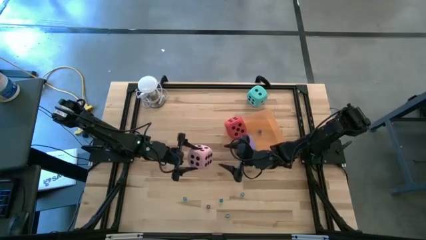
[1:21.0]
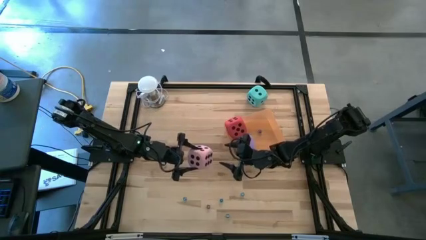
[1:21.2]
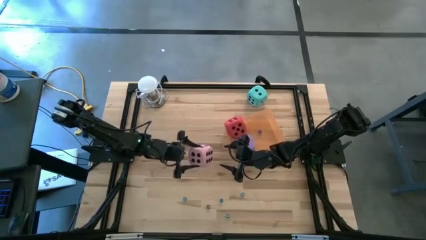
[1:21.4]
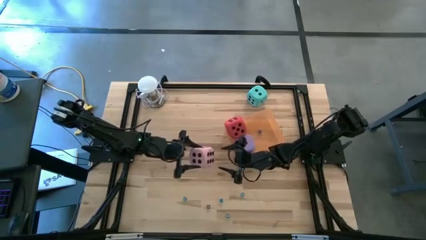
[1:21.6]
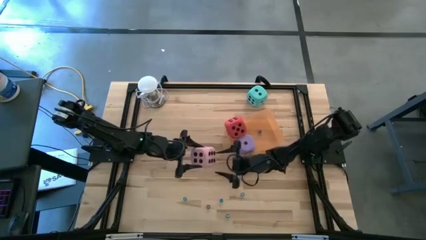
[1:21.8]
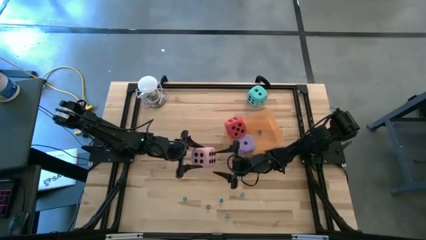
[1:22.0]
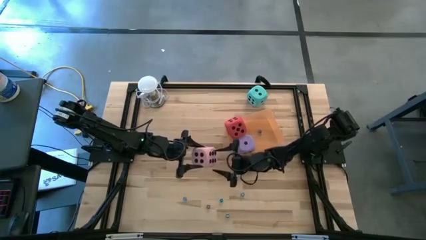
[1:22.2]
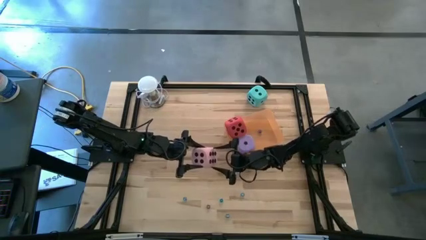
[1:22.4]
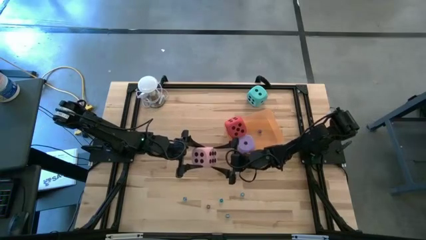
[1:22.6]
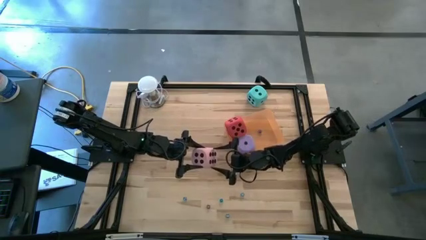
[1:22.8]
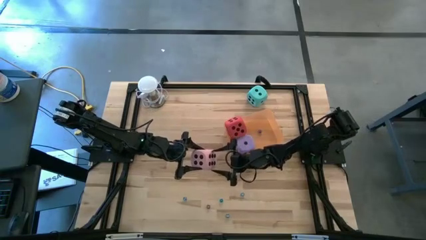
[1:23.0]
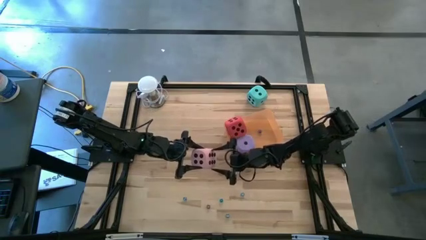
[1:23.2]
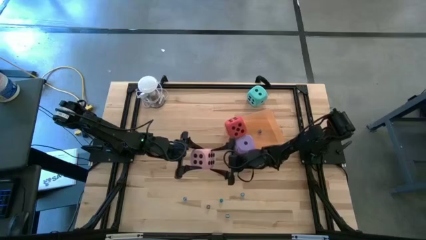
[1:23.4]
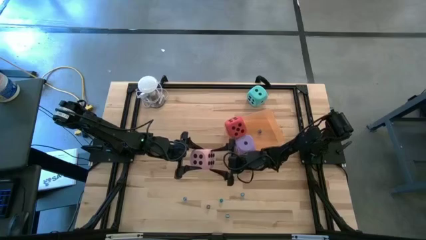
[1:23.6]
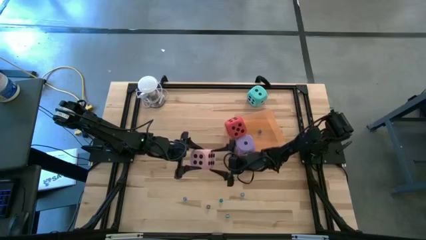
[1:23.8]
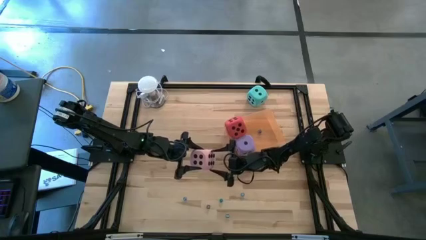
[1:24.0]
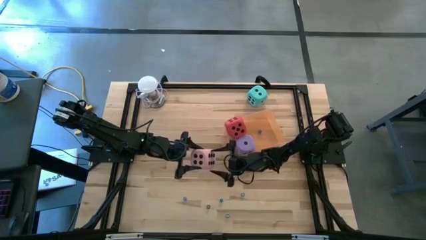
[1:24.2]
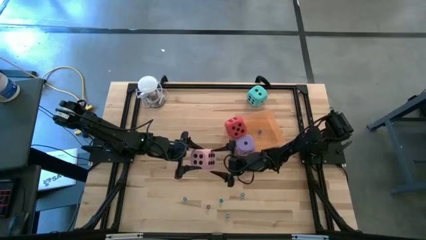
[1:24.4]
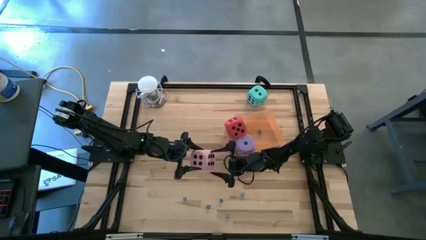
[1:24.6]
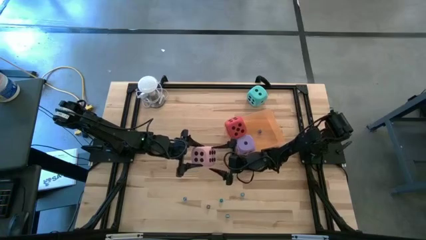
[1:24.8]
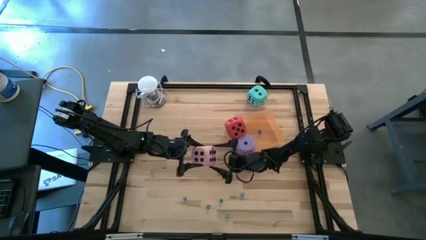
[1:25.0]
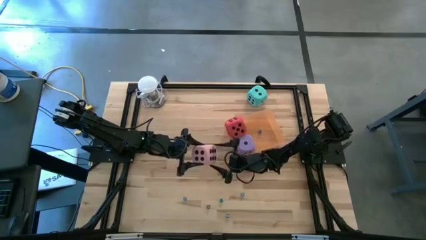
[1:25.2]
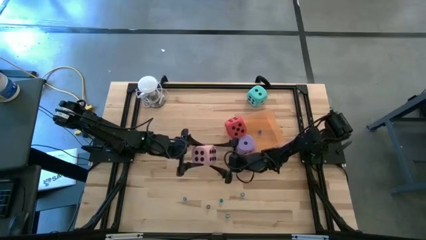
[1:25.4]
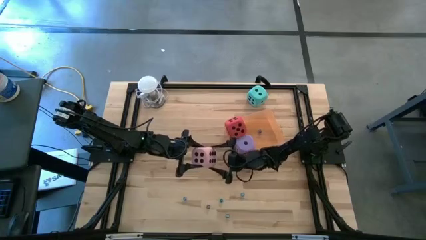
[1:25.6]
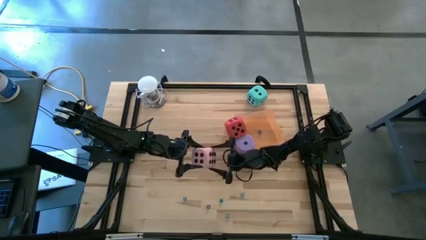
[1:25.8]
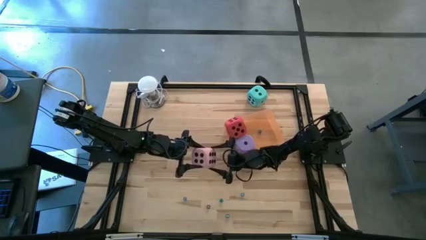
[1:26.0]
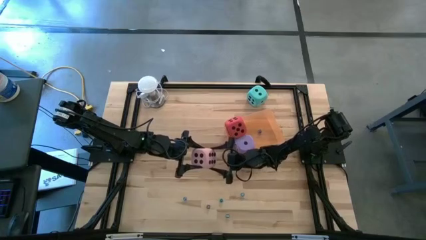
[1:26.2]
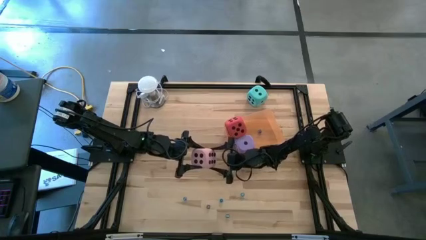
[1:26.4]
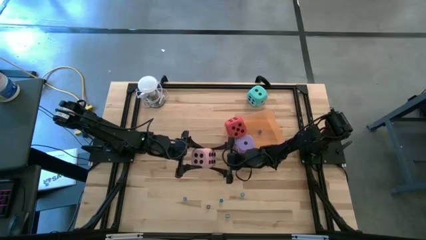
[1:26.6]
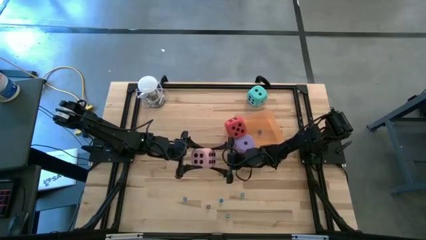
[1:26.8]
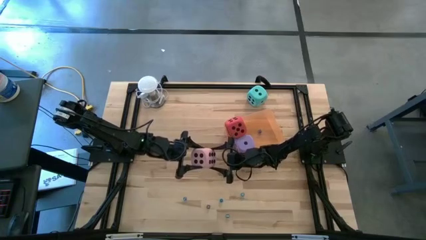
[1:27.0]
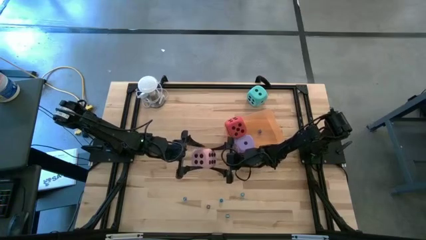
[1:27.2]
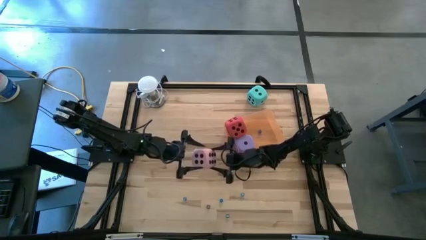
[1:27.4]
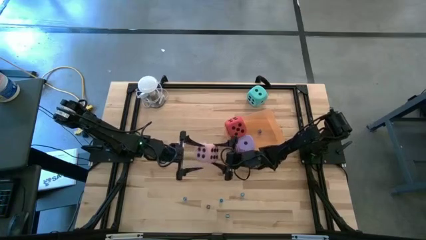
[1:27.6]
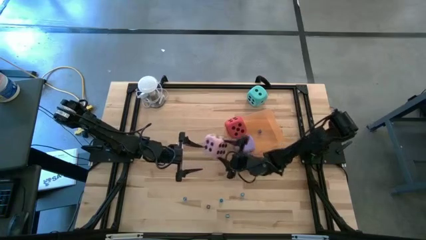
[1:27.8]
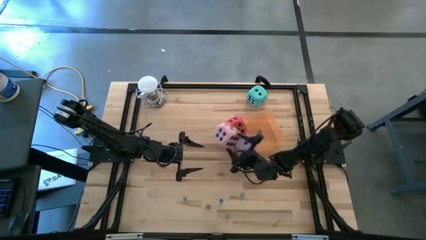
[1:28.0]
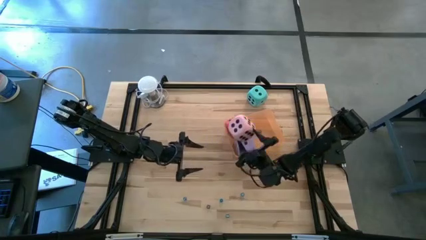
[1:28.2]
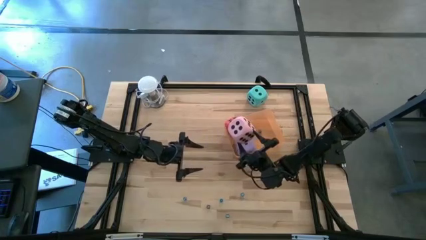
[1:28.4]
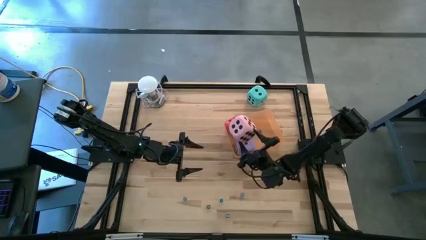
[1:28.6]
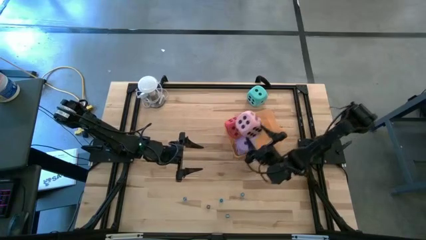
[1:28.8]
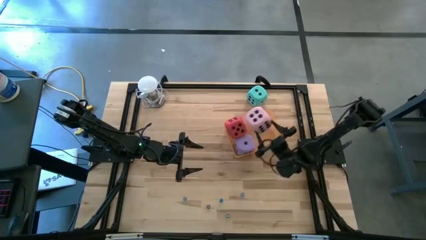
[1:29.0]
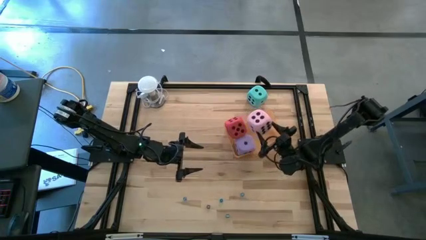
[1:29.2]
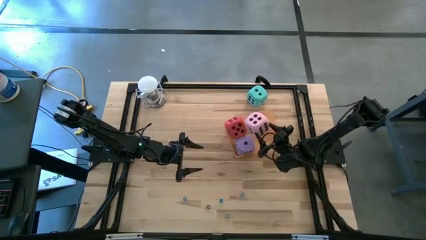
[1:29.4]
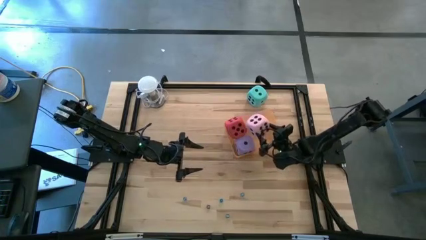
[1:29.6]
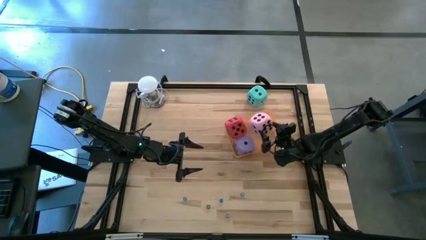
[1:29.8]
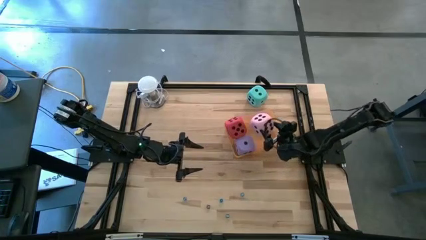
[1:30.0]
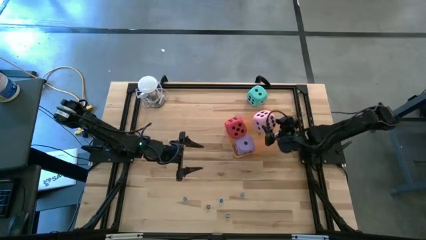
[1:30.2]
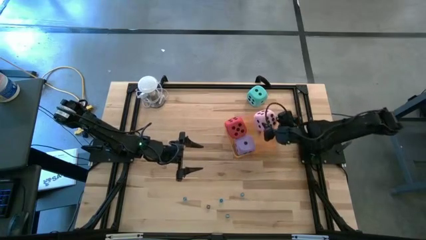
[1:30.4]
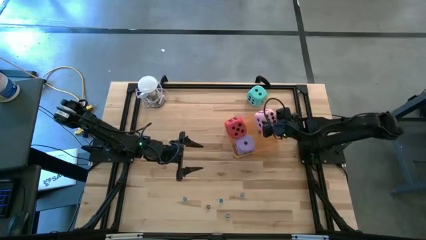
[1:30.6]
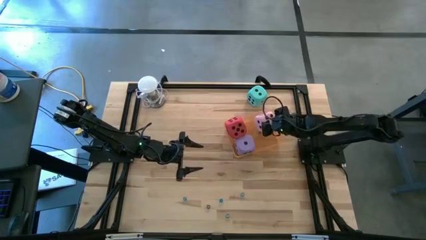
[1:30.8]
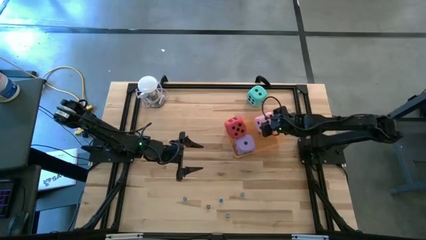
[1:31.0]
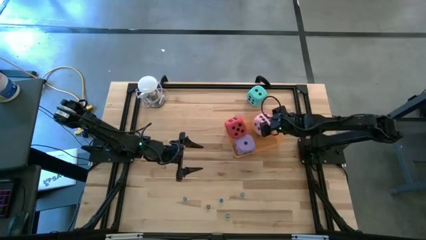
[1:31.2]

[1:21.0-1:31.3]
Task: Pick & Place Dice
Put the large pink dice into the orange bin

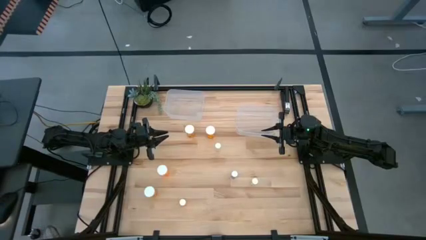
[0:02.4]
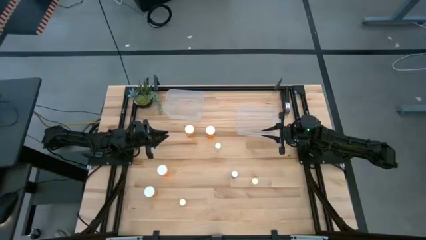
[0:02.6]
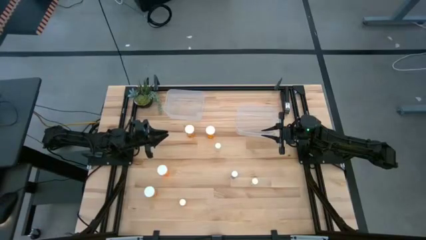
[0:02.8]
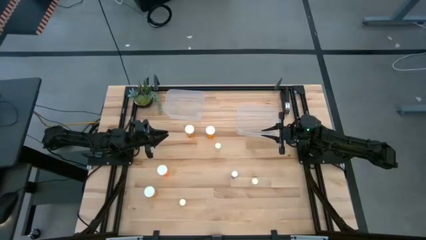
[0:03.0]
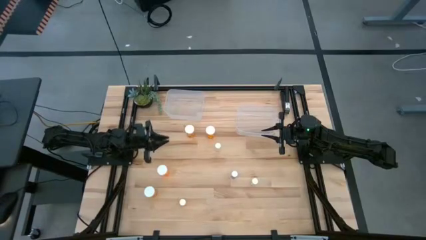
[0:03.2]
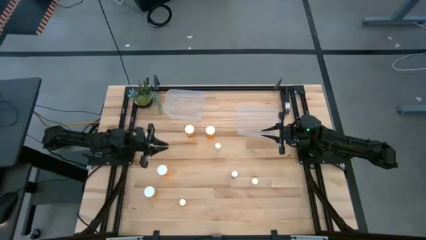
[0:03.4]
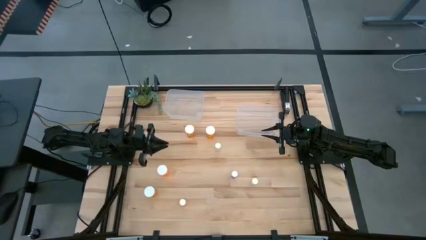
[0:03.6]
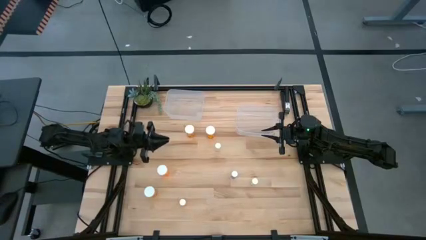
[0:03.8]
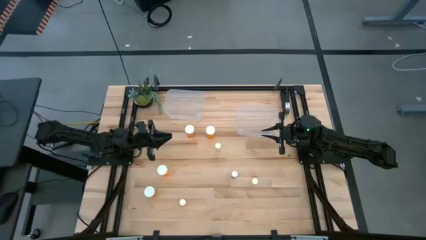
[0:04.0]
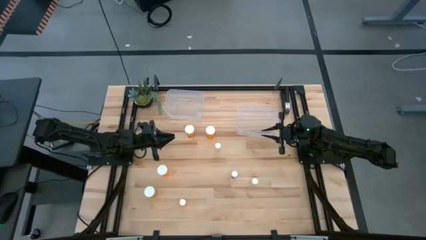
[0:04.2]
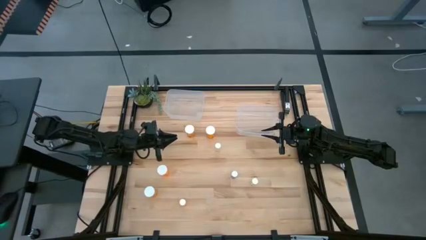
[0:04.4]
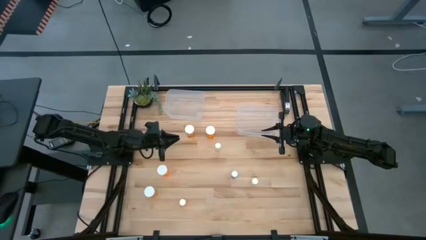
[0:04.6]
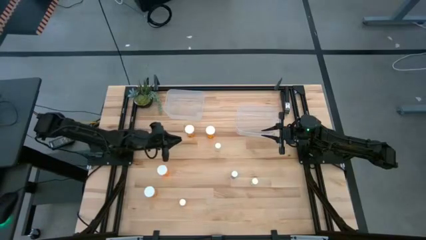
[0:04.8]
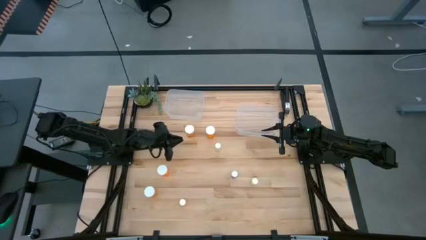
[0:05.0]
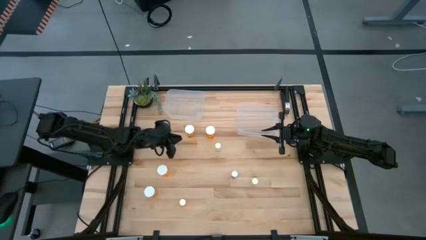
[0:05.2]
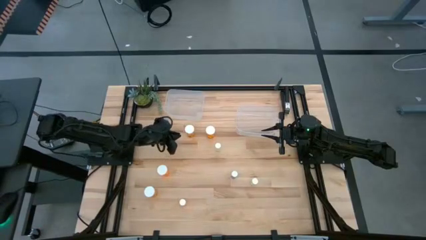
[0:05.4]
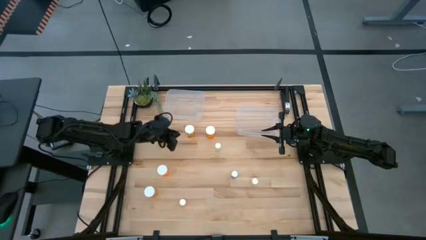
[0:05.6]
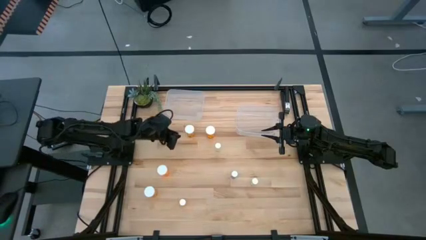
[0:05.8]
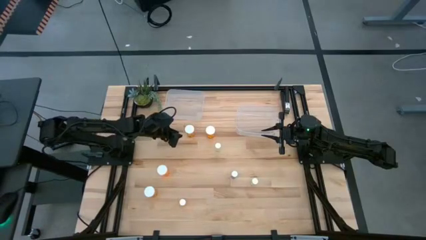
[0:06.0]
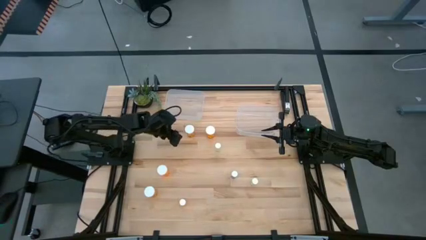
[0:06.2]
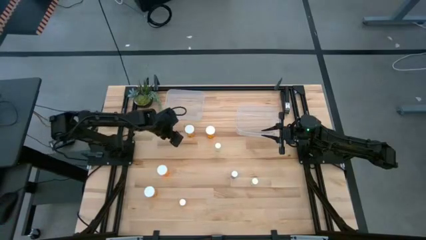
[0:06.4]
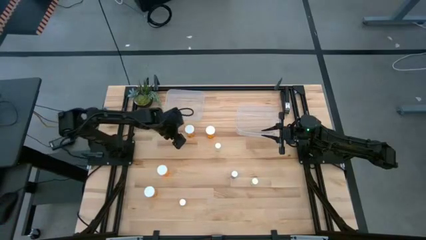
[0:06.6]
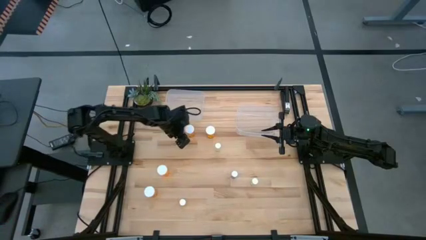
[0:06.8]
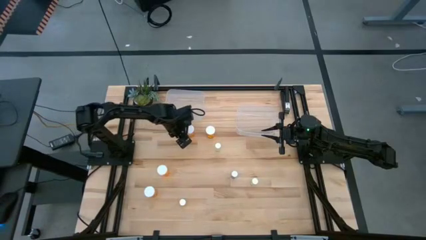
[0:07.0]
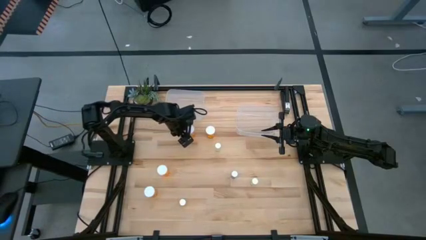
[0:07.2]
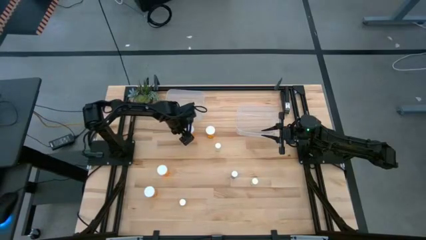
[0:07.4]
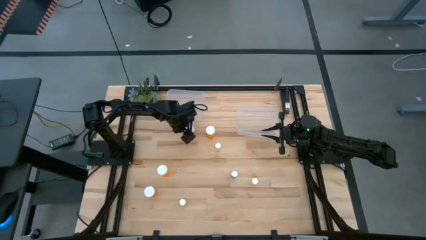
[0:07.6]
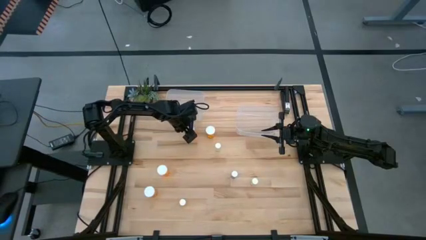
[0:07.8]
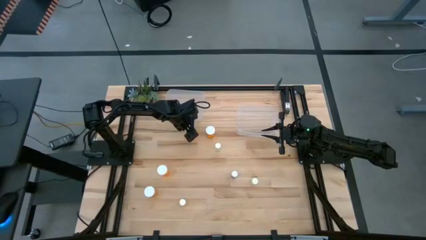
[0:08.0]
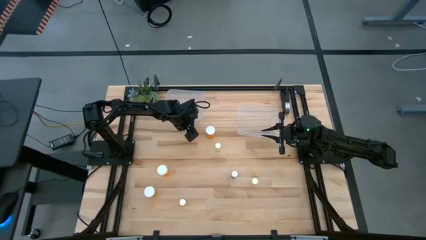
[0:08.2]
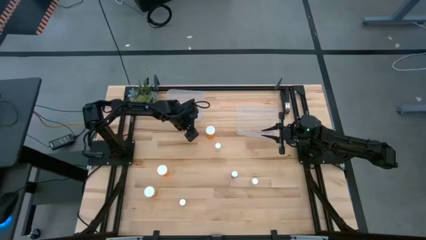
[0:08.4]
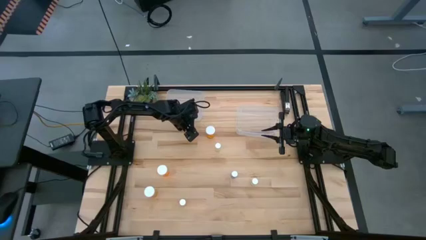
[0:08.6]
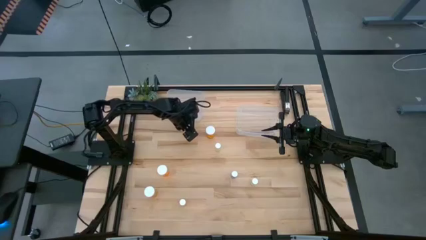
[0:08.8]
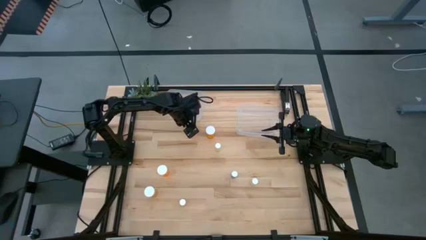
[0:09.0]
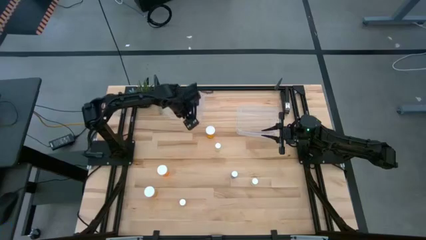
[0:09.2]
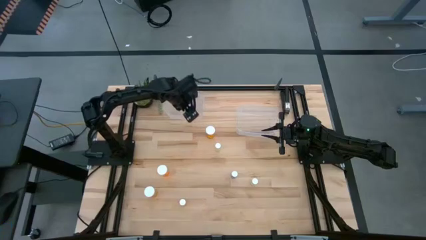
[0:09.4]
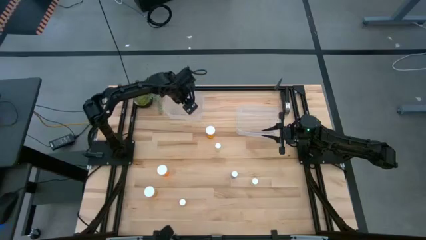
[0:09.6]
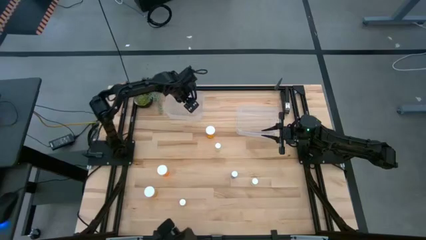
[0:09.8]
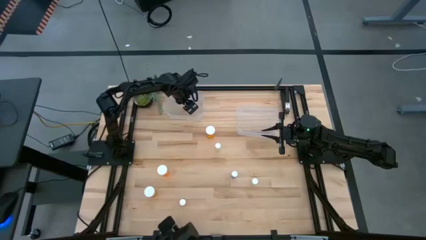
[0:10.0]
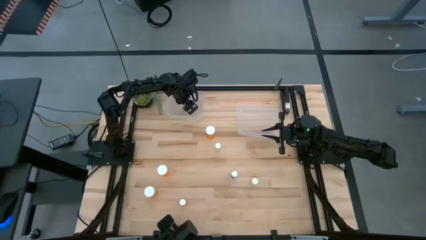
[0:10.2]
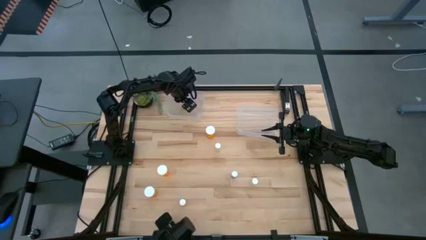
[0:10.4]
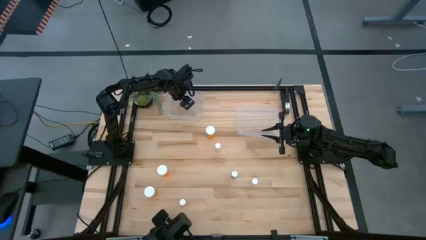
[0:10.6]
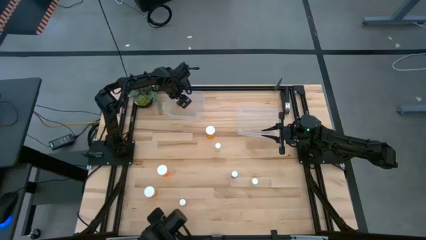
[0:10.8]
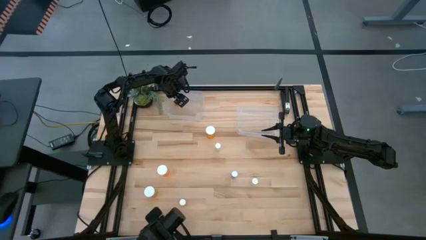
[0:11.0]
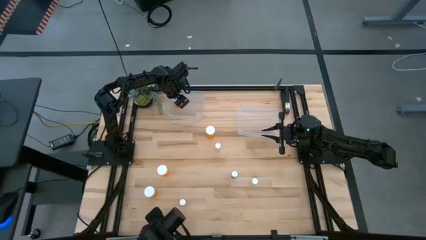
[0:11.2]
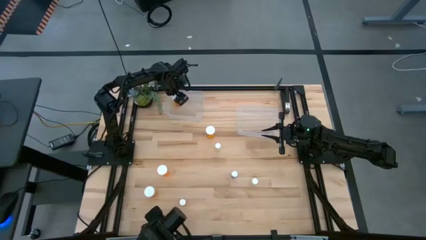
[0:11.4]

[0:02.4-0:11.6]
Task: Pick and place medicine bottles into bin by pill shape (circle, oval)
Put the large orange pill bottle into the left transparent bin
